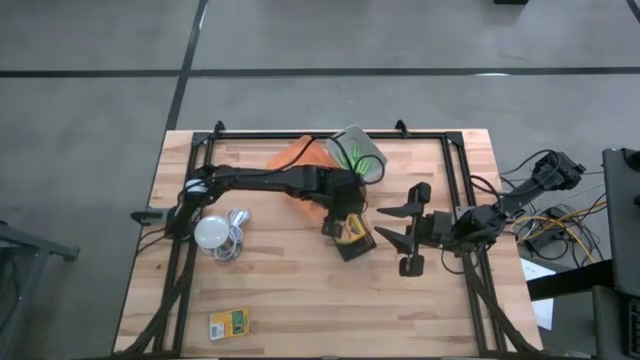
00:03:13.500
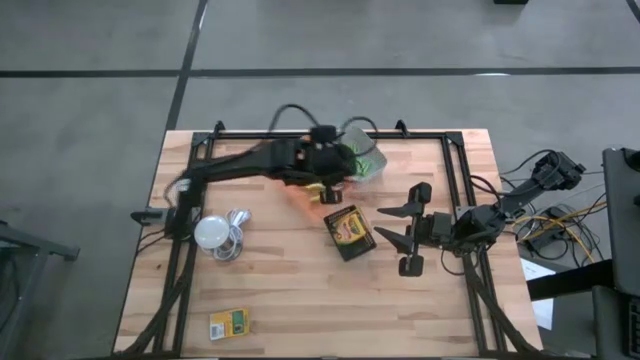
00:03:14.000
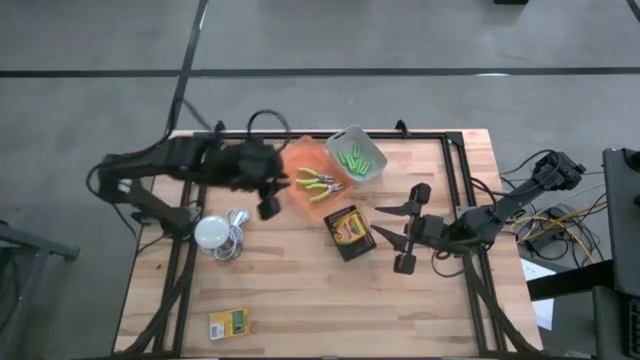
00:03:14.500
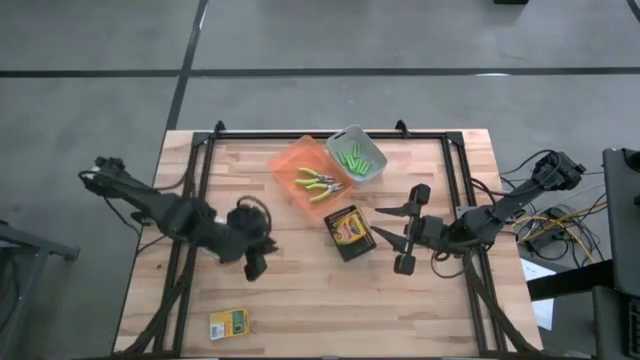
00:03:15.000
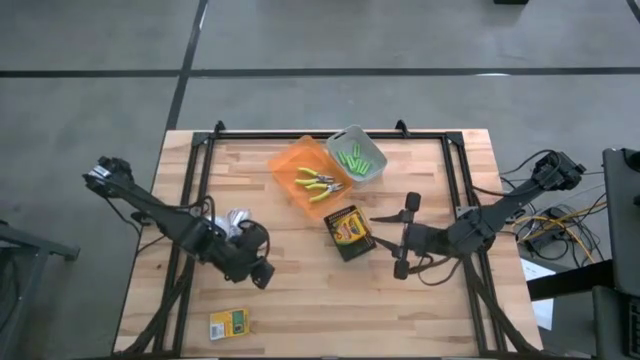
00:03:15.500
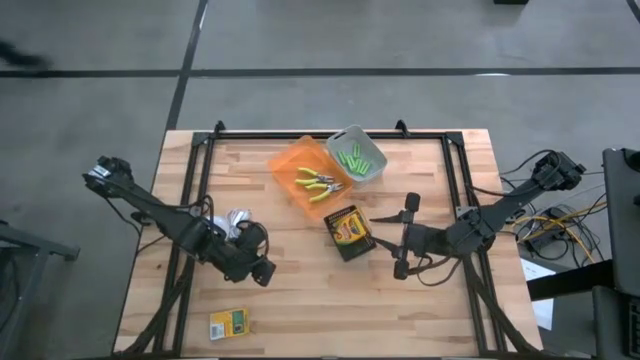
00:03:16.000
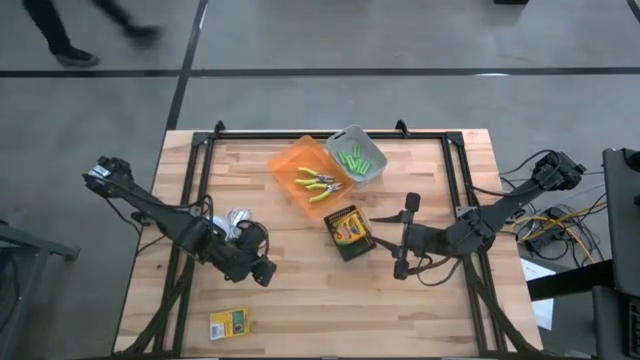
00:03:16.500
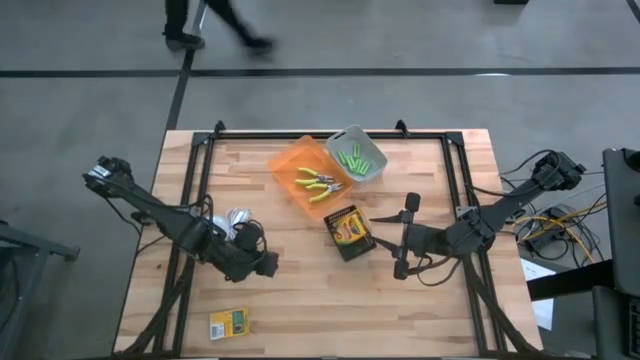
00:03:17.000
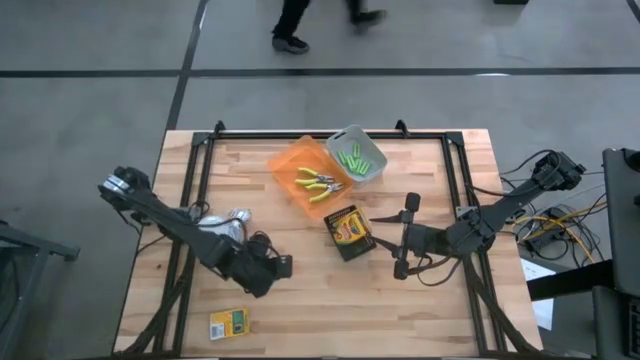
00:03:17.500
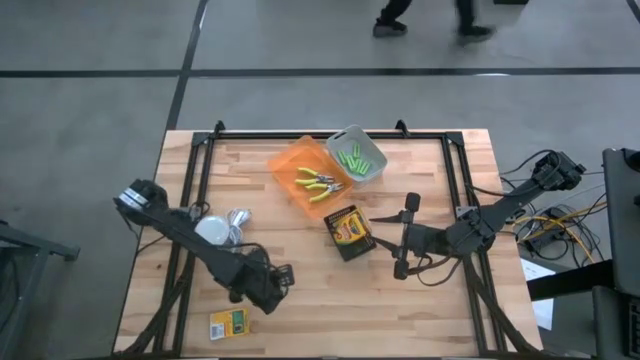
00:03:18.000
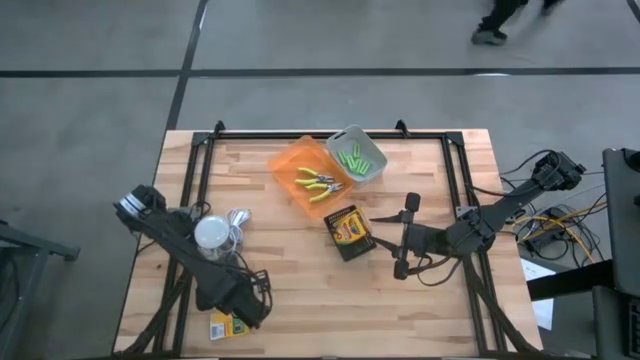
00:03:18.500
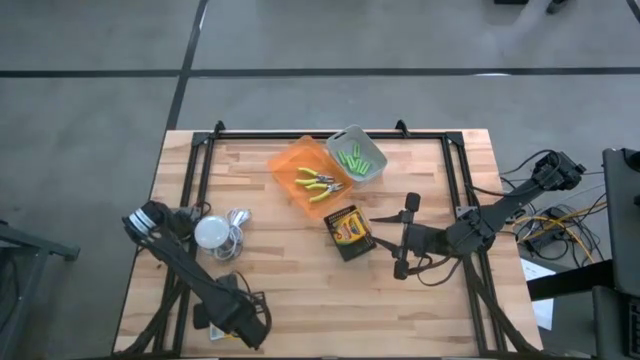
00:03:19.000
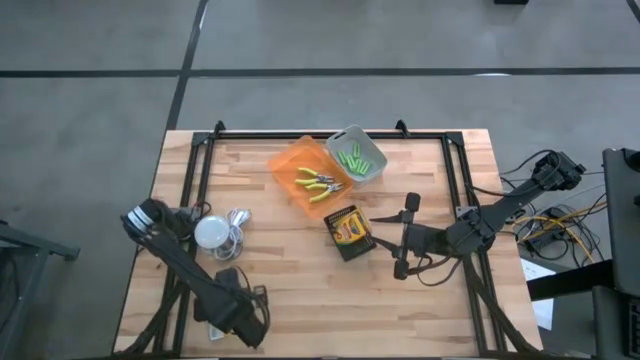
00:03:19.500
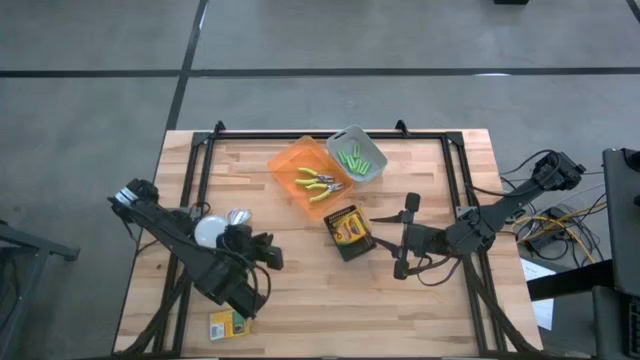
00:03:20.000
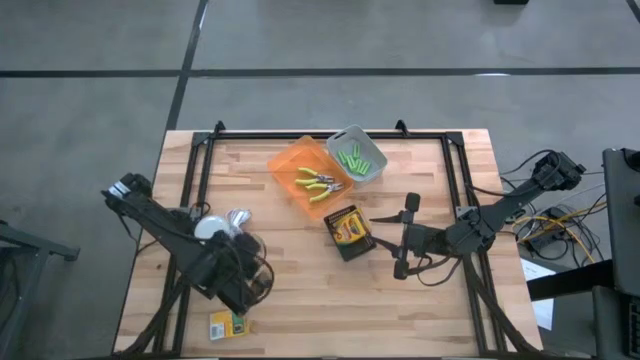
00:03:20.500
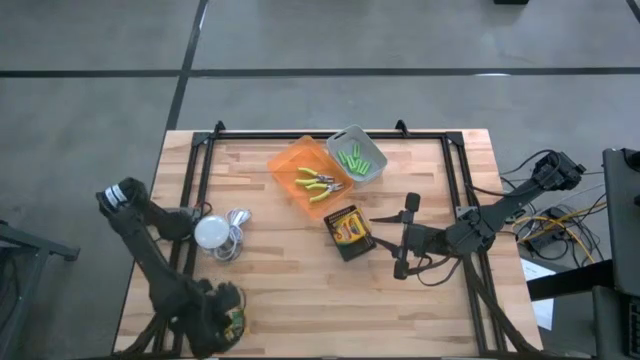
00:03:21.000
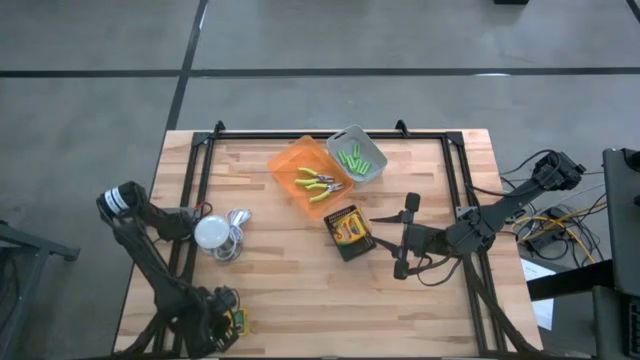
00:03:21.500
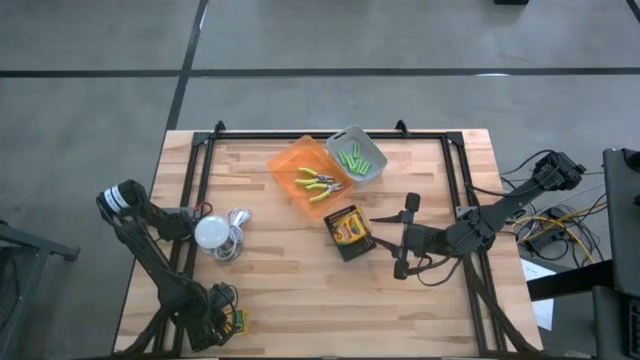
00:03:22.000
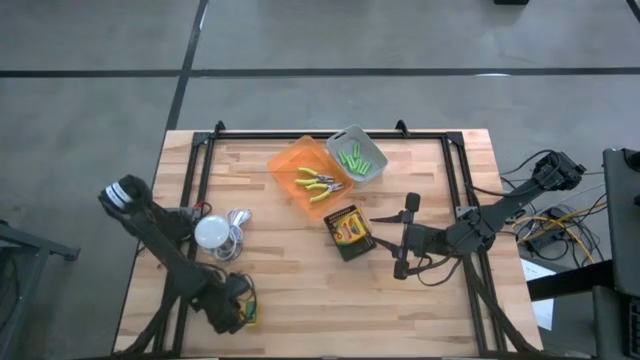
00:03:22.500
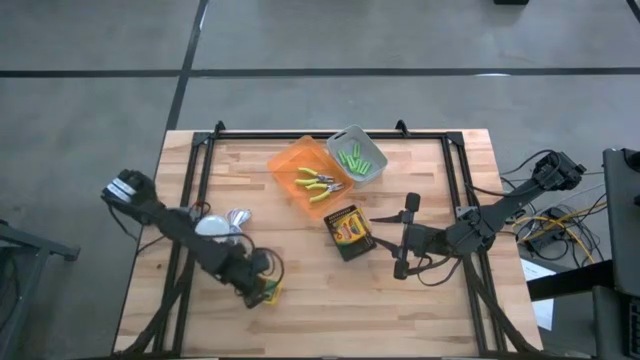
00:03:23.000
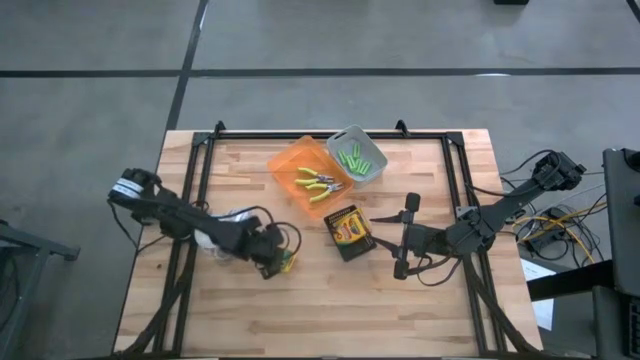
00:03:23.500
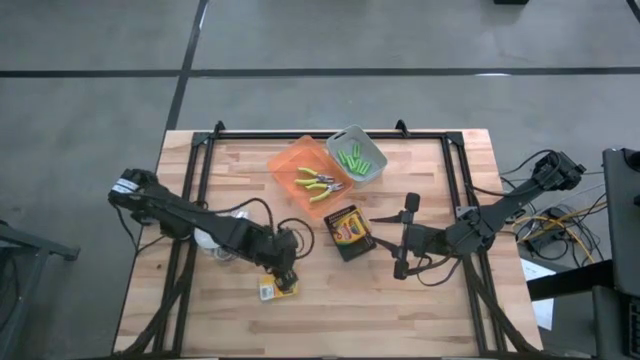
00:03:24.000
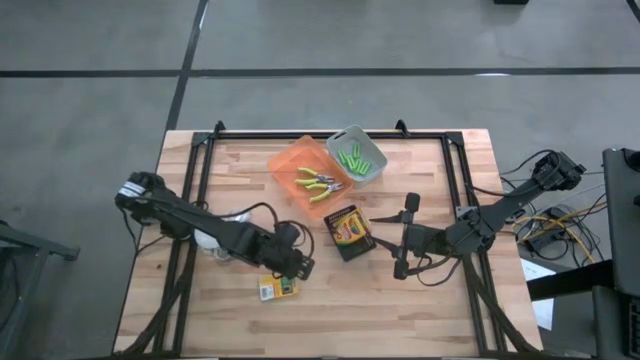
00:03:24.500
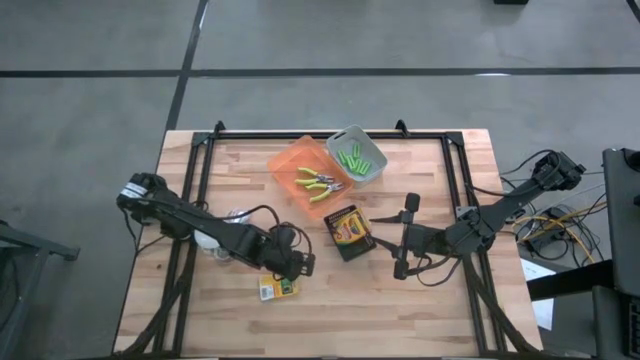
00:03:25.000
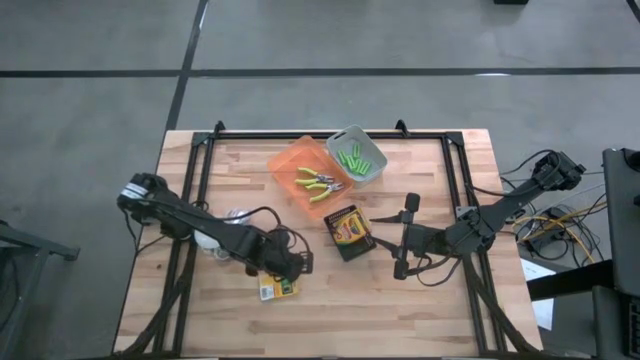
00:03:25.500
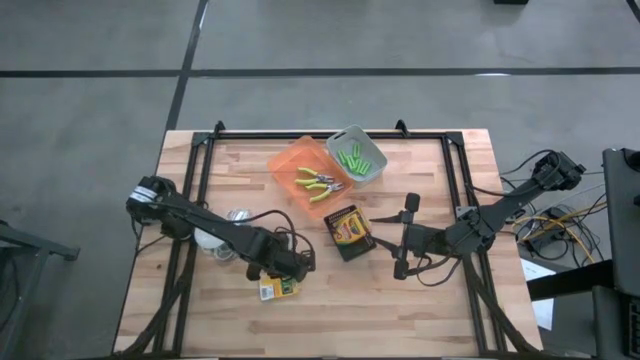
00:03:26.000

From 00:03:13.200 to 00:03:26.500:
Task: Pick & Place School Supplies
Put the yellow crayon box into the black bin

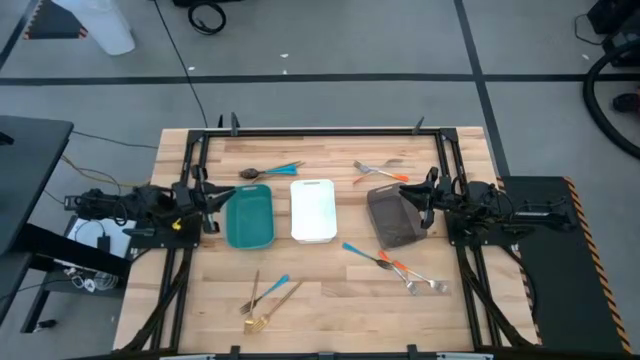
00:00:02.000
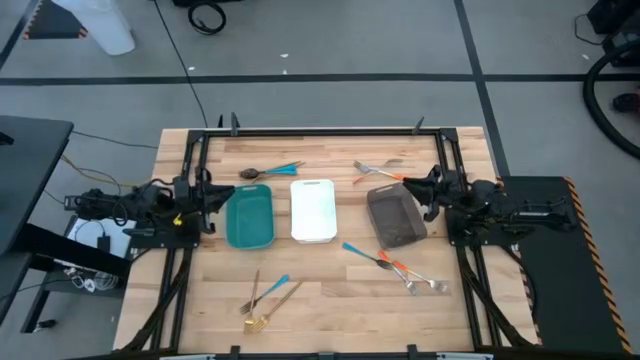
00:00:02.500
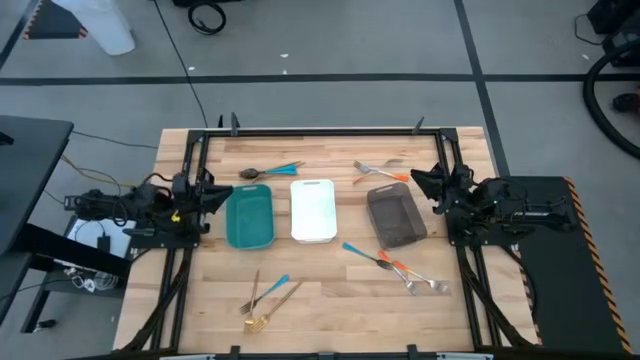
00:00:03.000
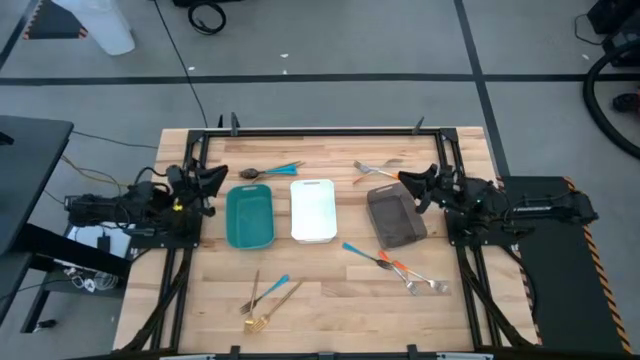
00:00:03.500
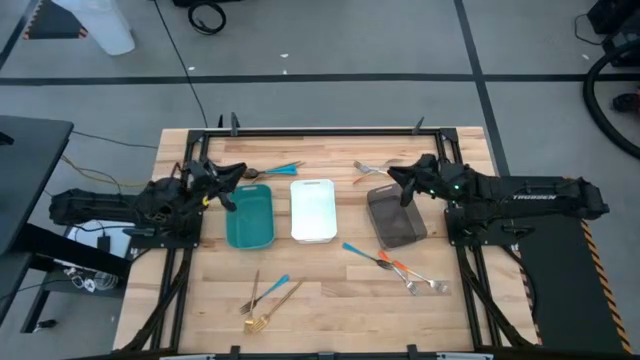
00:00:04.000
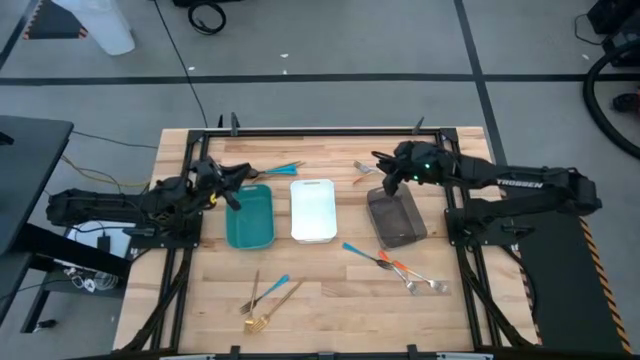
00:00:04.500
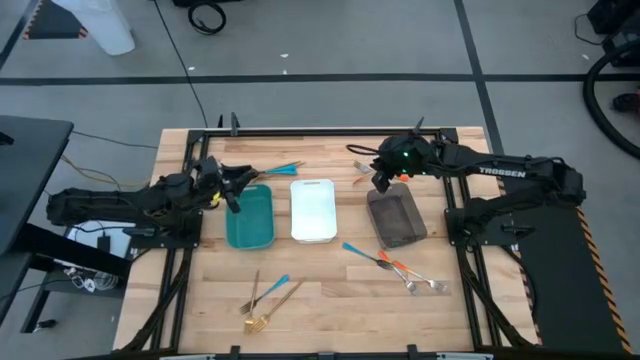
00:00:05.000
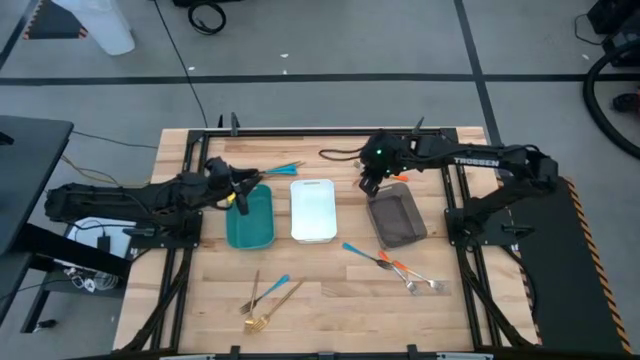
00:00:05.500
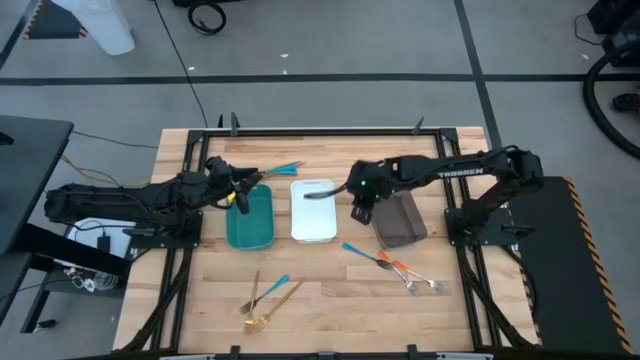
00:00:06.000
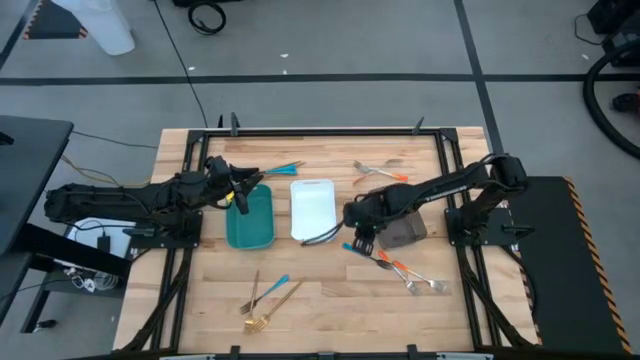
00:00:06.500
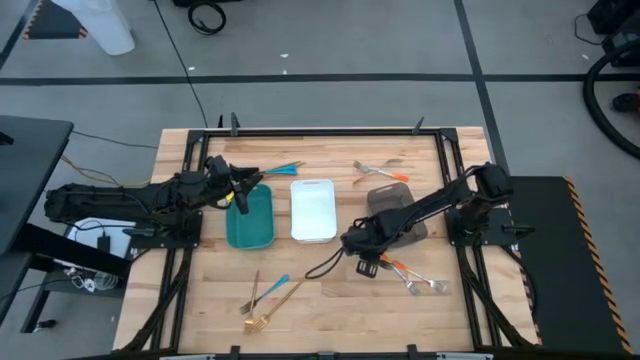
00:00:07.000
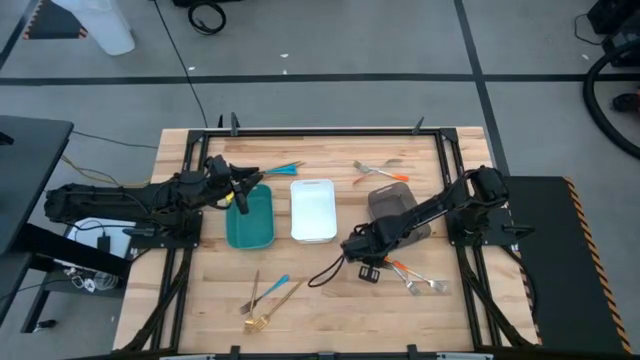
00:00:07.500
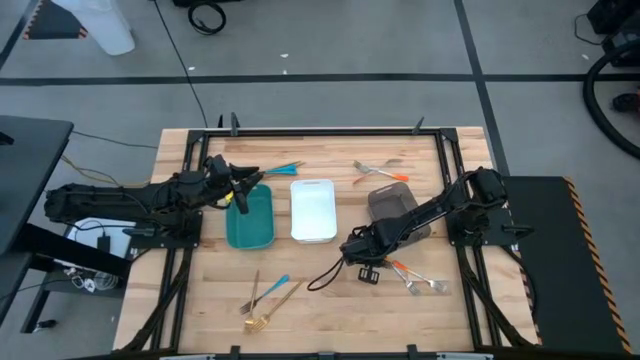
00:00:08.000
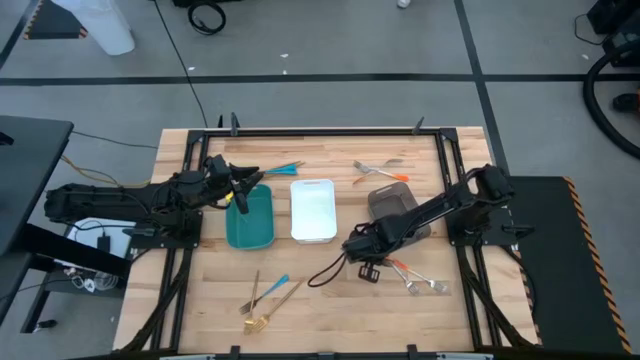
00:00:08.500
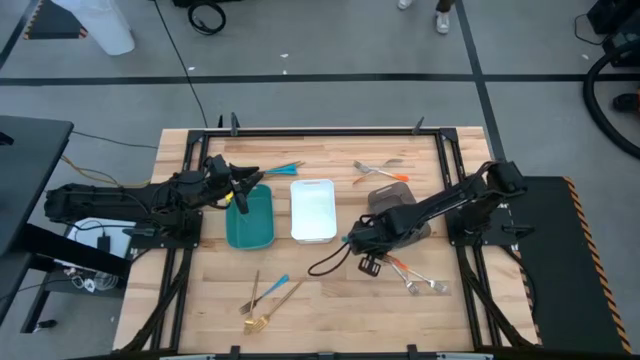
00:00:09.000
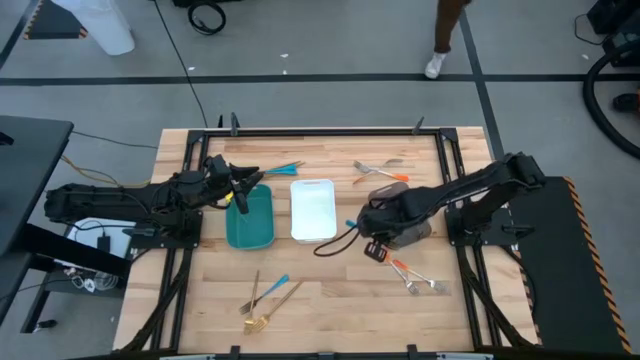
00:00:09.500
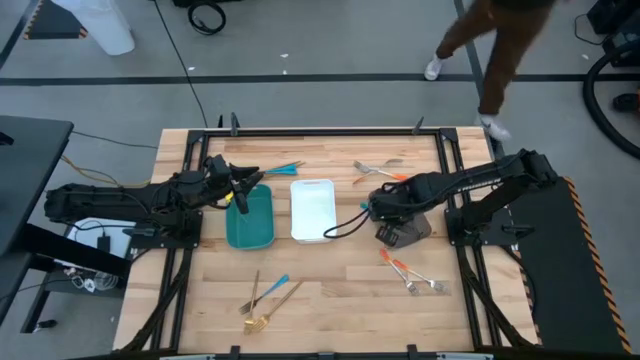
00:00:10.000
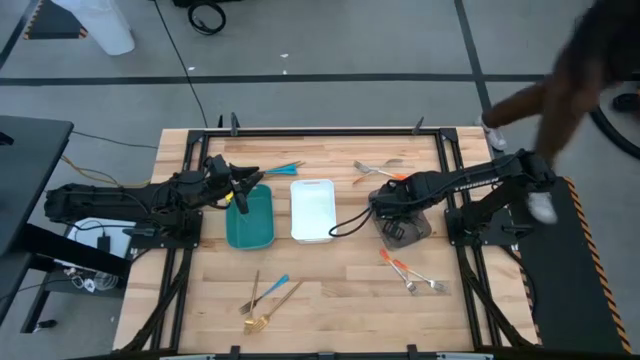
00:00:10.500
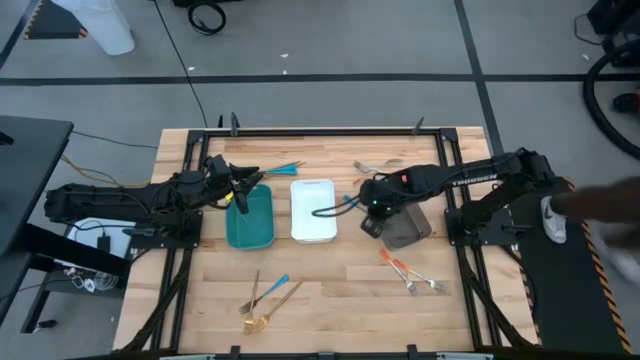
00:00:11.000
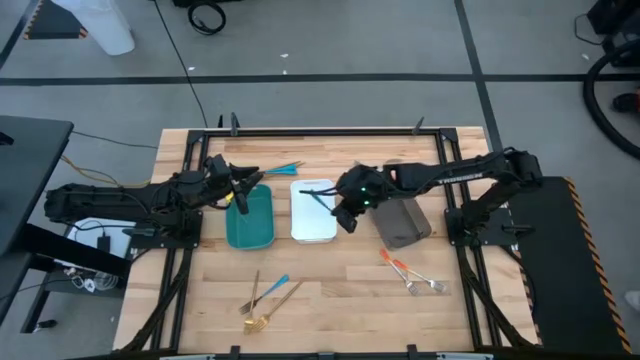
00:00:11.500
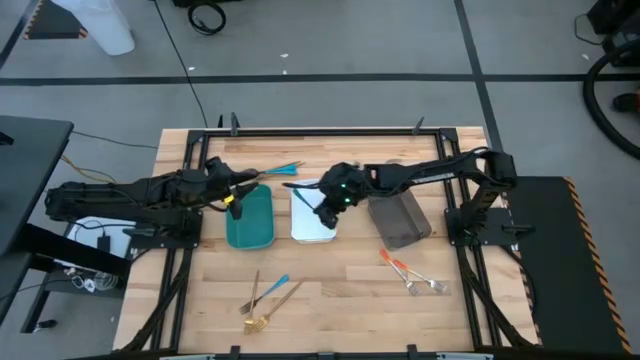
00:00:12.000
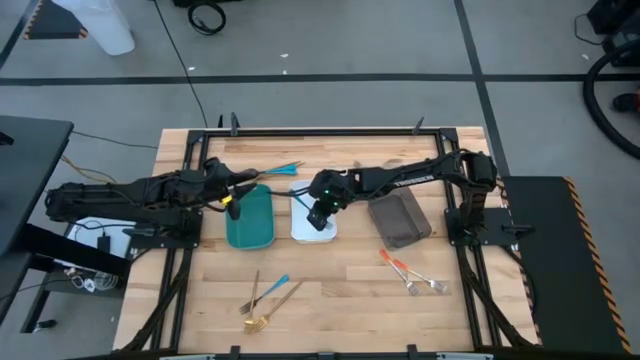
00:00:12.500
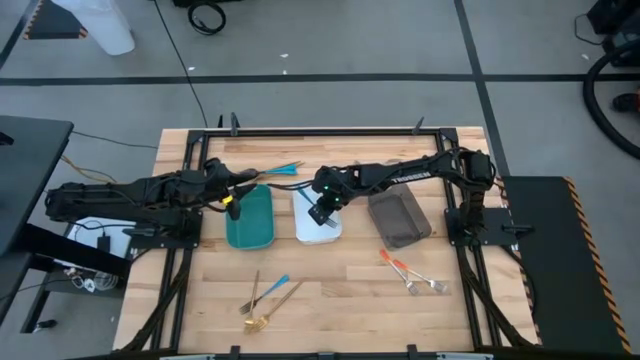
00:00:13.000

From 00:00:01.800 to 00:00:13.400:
Task: Sort silverware by color (type)
Put the blue fork into the white bin
